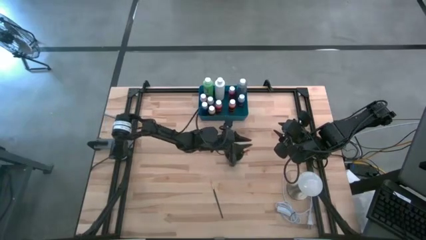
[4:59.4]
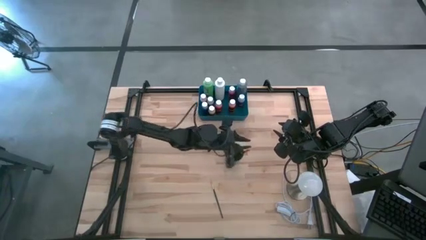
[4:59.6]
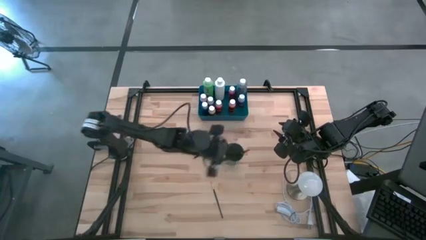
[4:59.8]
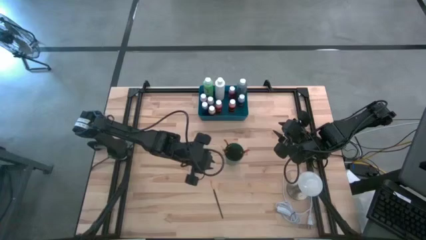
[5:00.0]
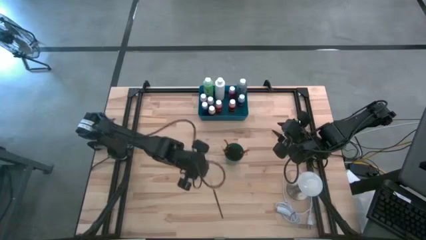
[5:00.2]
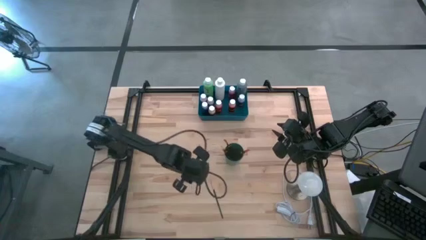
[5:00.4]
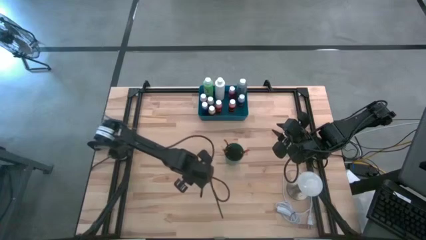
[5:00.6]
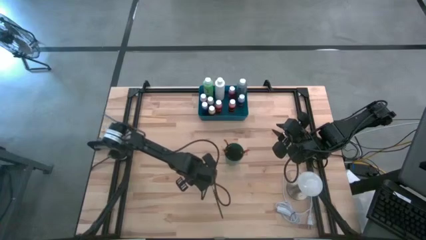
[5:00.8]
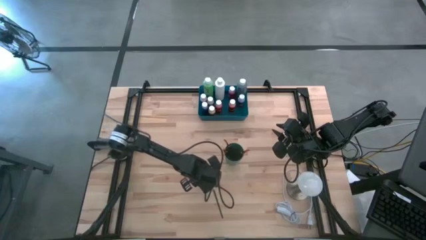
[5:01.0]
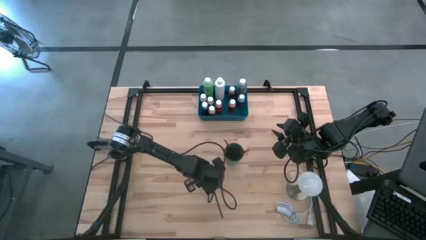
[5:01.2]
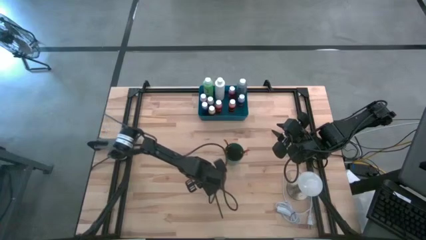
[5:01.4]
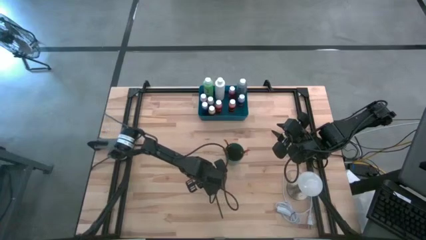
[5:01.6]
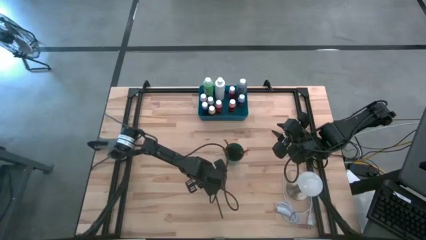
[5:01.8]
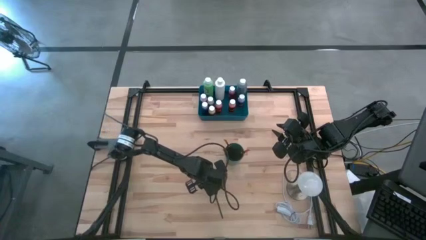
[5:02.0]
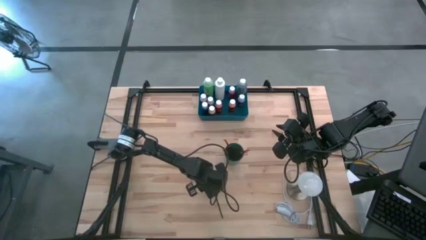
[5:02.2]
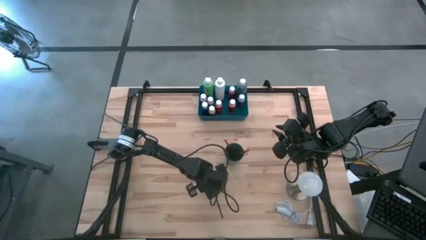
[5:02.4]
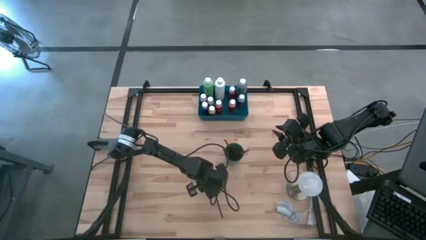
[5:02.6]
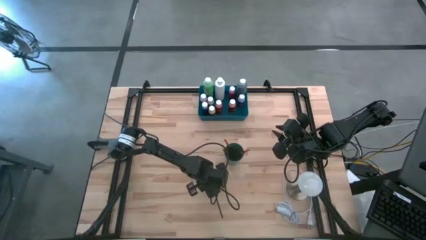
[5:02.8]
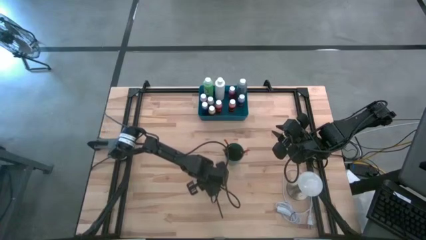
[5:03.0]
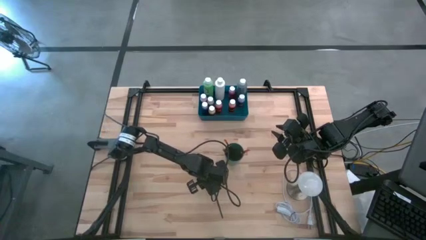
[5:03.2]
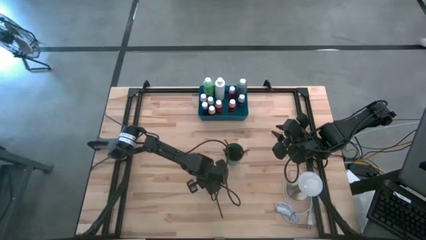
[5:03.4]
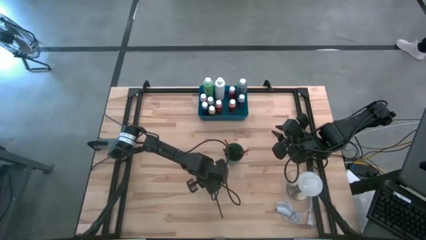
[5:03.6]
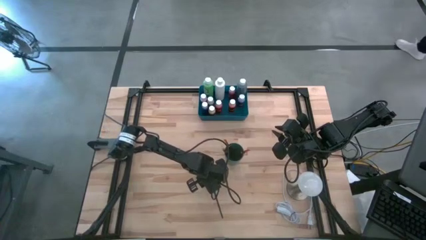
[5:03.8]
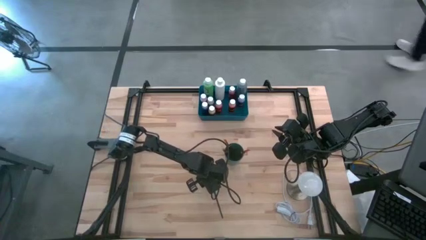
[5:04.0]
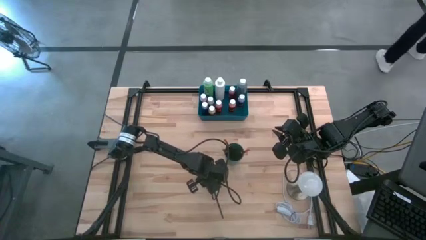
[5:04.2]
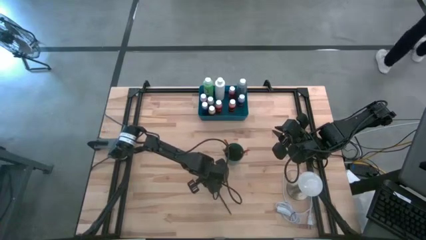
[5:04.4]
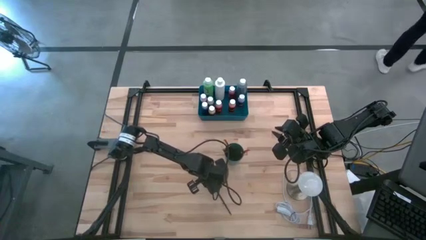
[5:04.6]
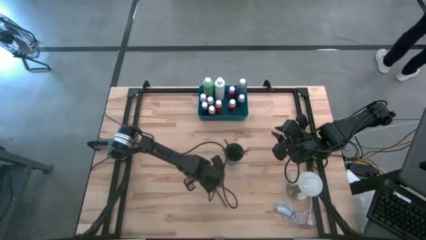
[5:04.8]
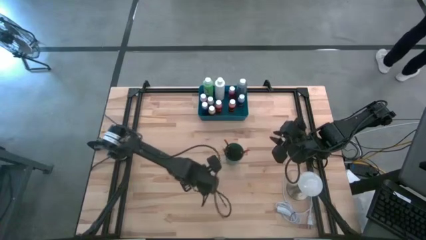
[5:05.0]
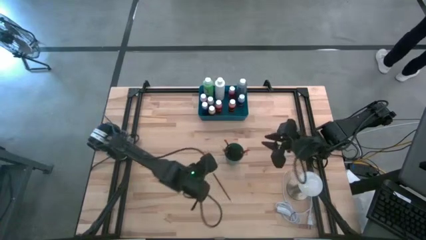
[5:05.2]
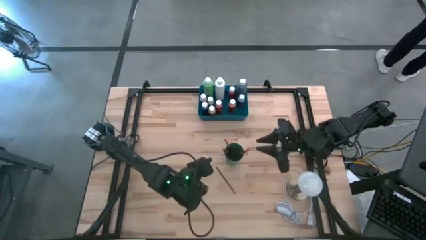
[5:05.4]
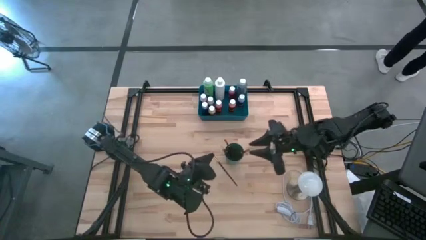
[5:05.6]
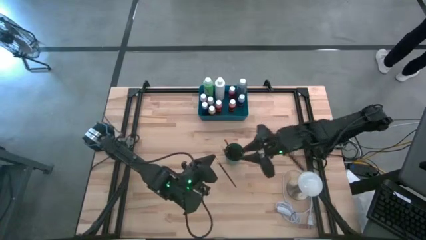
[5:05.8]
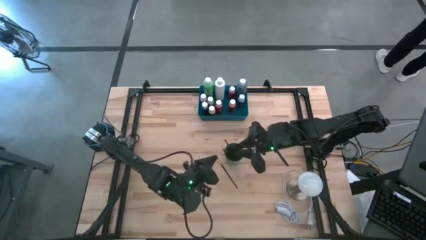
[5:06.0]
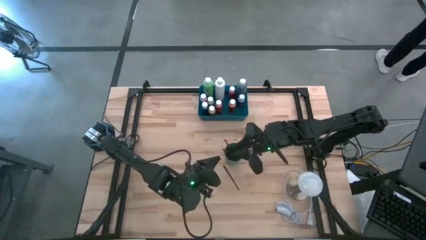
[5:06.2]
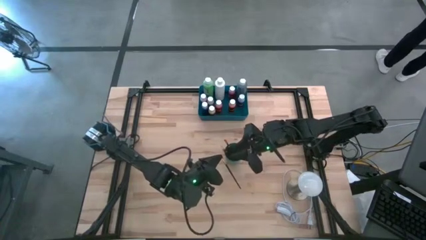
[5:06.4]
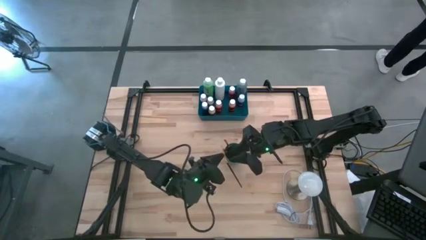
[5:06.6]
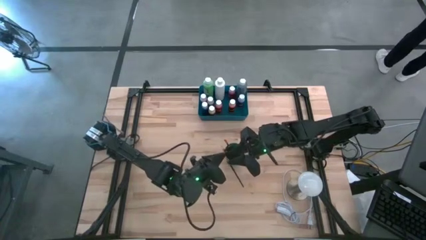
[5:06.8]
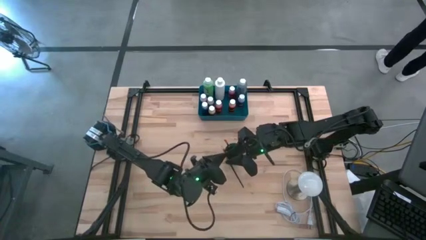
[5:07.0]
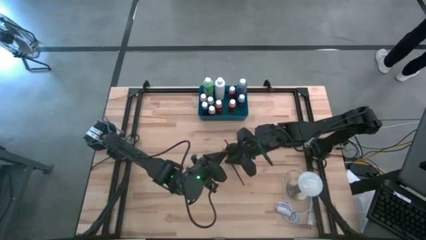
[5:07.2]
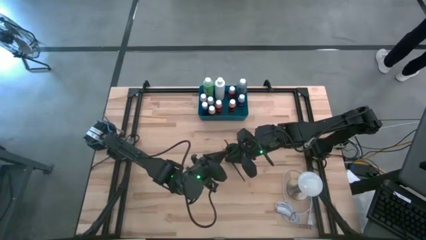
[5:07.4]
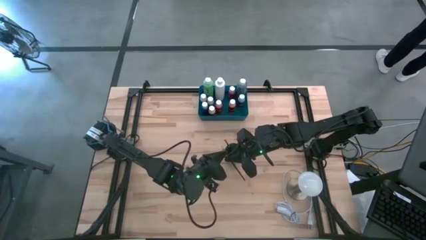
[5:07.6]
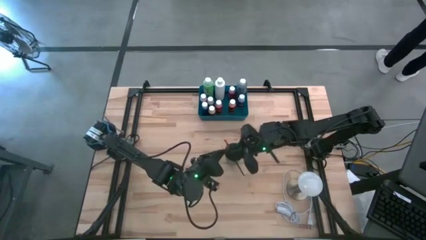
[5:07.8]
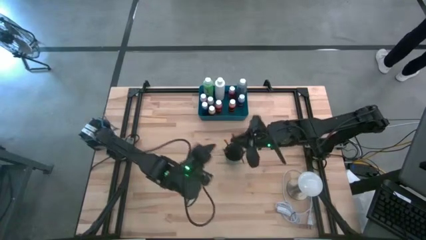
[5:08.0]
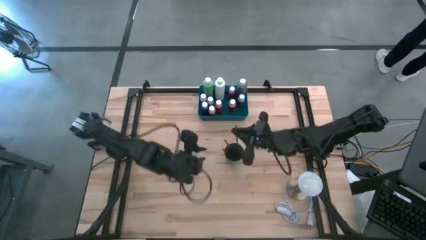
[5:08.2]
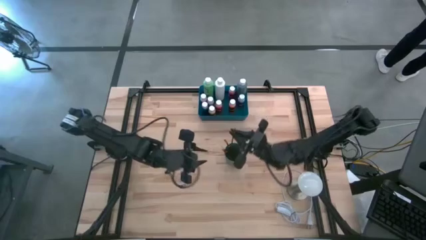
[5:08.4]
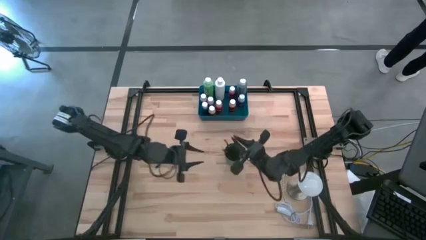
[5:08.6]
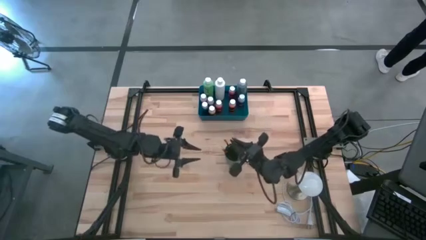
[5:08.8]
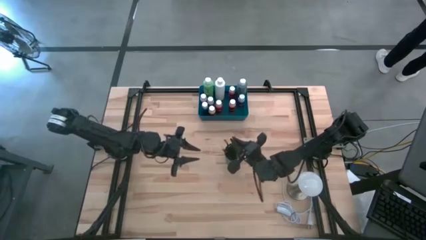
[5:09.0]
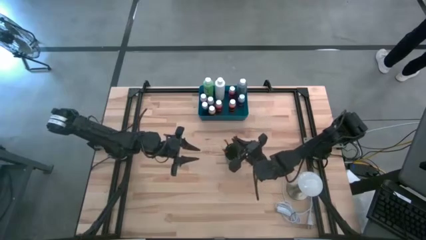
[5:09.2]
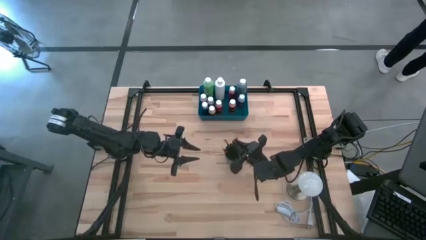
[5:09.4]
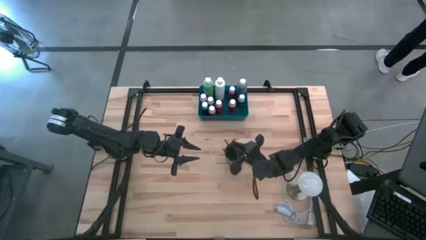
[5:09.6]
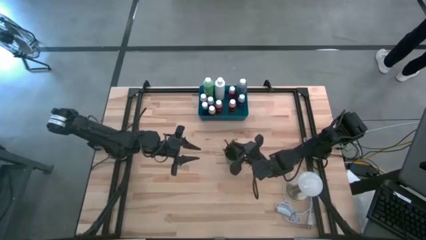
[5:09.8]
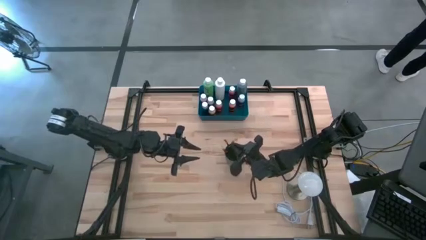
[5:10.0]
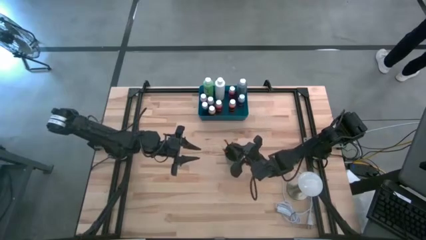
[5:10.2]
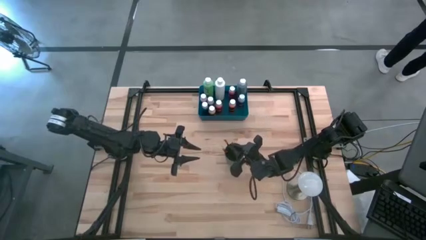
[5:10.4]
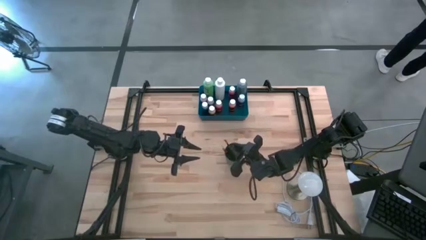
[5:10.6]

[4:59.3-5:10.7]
Task: Pick & Place Paint Supplies
Put the yellow paint brush into the green cup

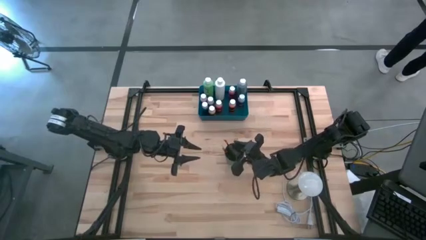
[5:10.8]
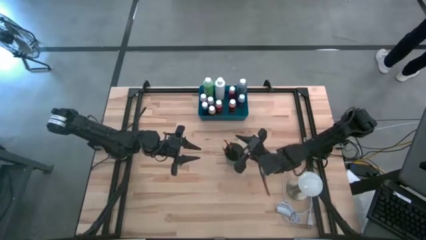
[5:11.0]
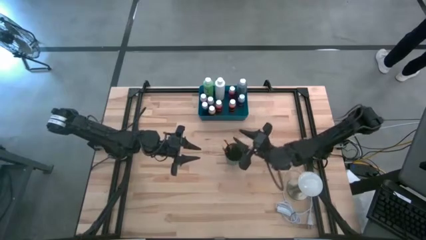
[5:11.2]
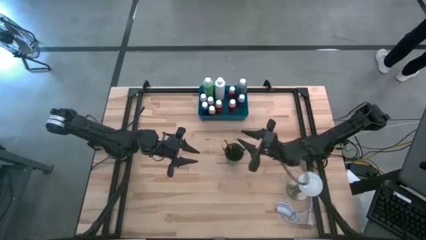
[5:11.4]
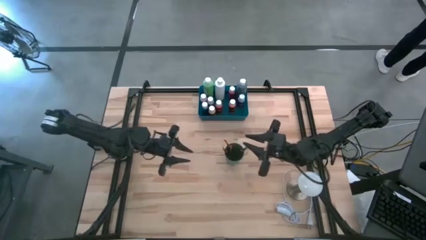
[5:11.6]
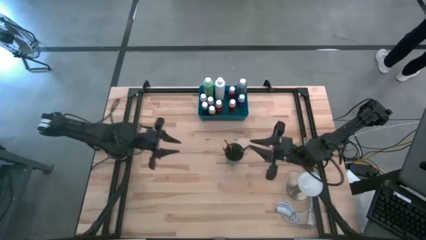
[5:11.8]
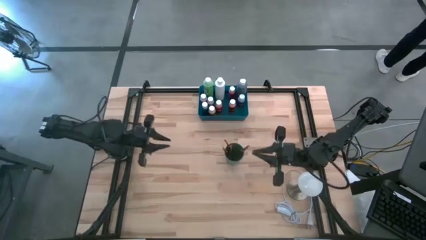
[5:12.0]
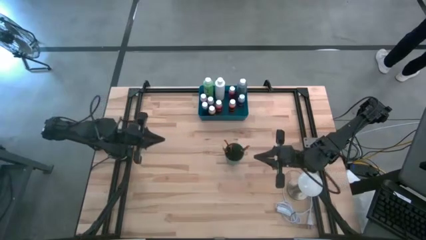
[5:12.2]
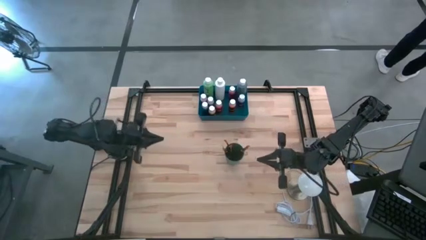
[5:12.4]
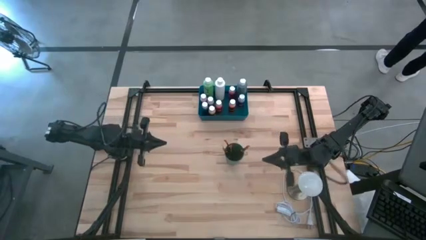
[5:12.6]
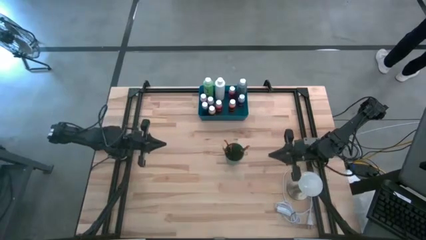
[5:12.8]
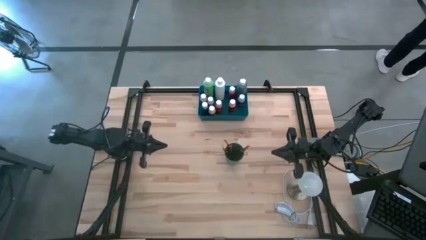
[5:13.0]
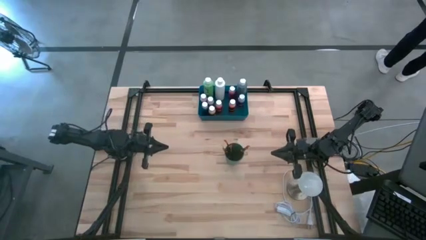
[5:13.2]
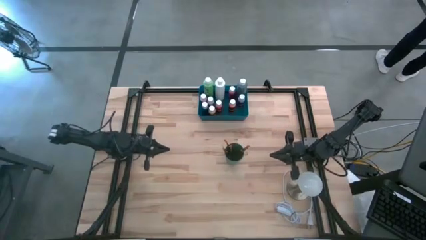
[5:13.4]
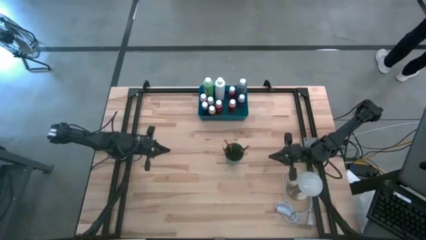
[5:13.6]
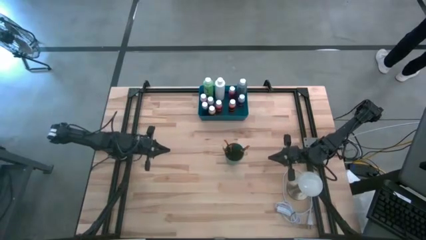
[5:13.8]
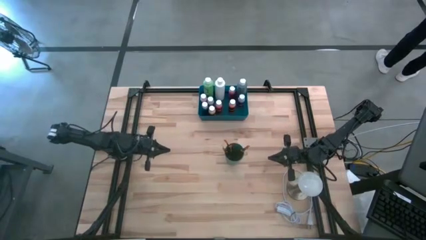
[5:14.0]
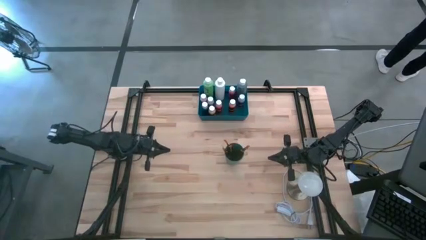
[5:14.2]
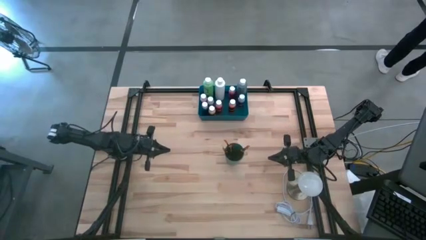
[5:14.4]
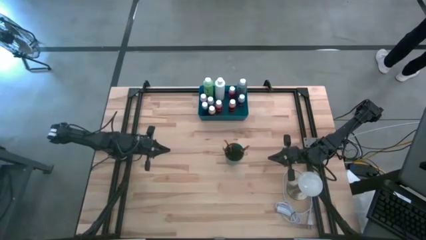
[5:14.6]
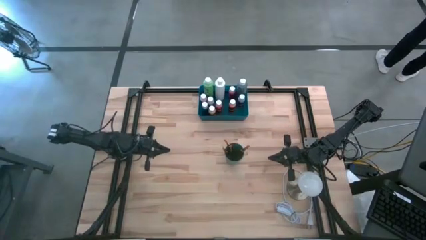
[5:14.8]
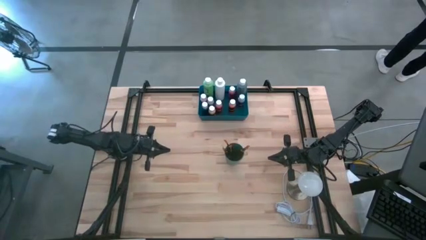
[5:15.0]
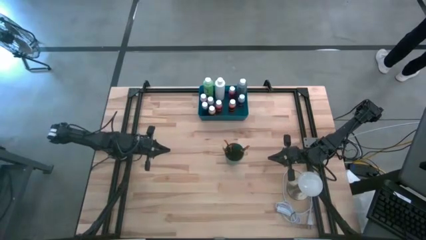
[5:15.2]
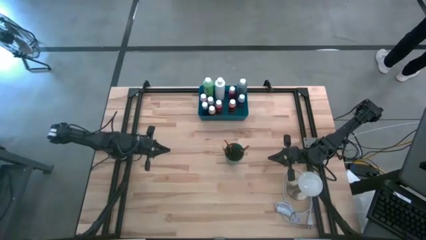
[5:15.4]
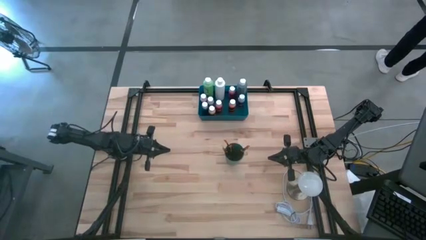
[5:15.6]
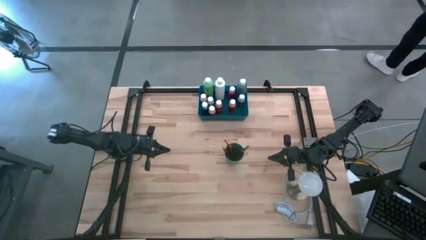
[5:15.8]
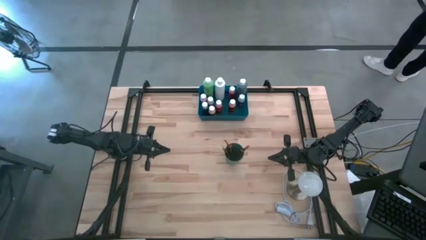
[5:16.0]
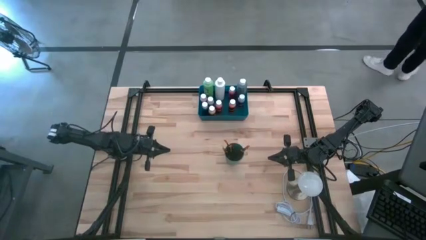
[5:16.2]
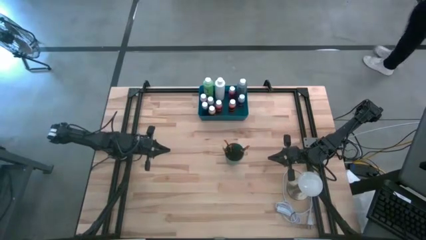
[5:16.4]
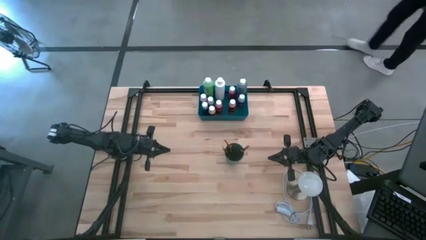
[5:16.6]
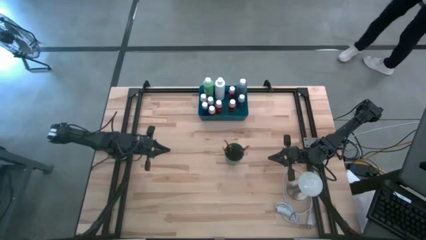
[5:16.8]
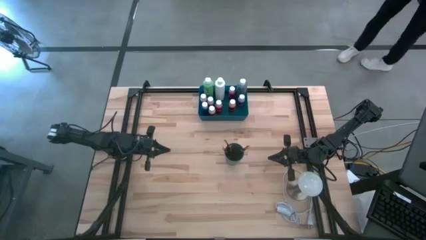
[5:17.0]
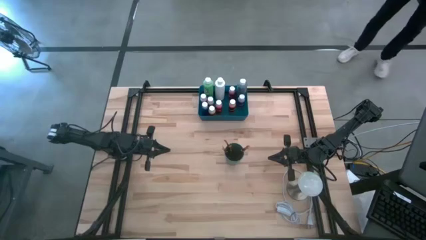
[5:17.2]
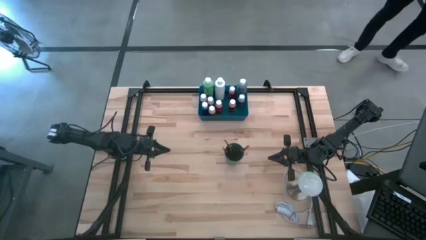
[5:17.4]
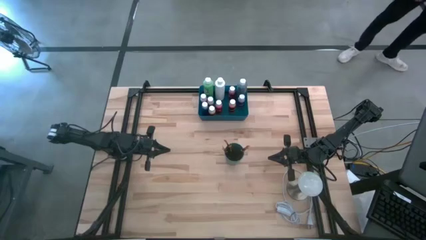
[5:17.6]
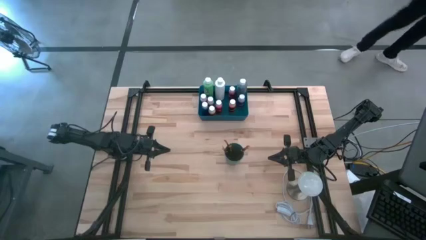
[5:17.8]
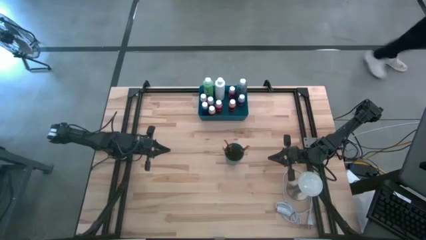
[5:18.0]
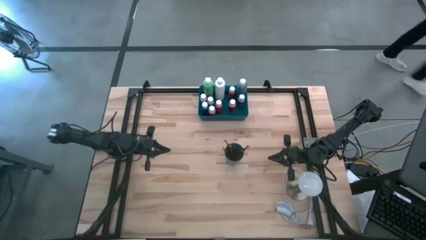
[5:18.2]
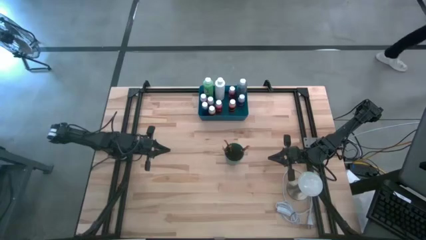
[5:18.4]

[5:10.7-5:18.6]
Return to Home Position
